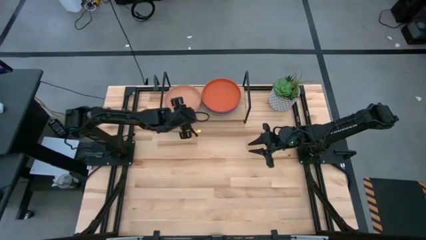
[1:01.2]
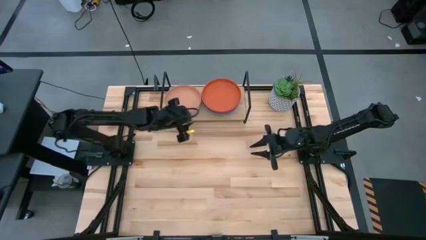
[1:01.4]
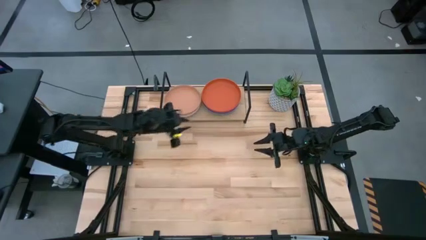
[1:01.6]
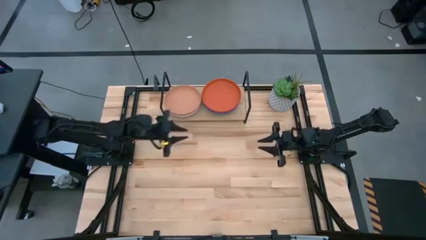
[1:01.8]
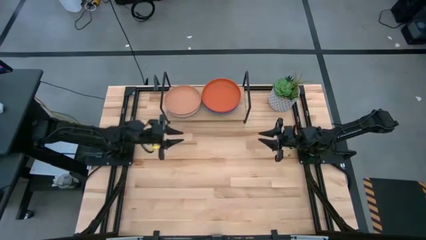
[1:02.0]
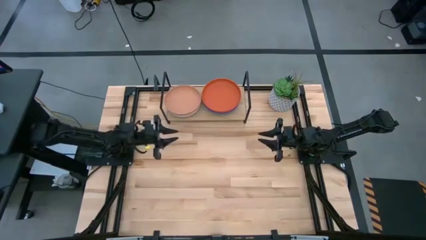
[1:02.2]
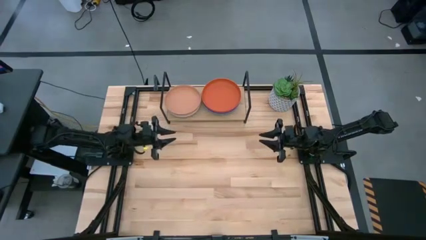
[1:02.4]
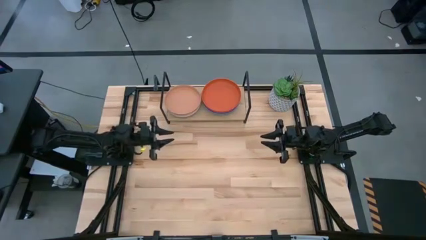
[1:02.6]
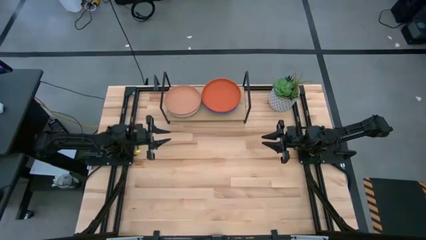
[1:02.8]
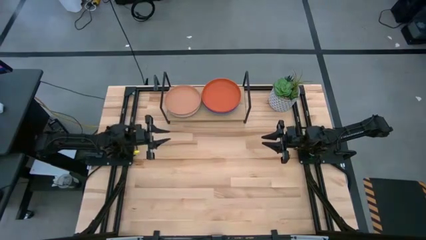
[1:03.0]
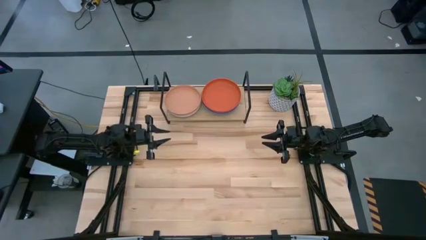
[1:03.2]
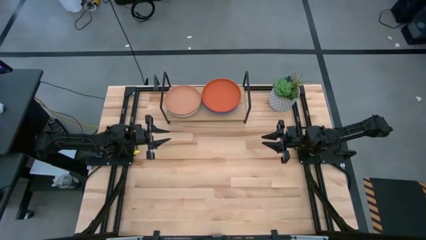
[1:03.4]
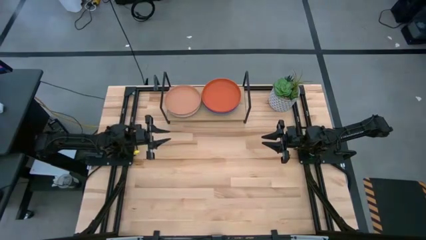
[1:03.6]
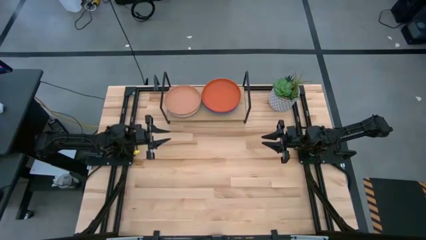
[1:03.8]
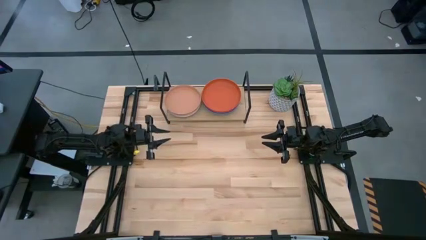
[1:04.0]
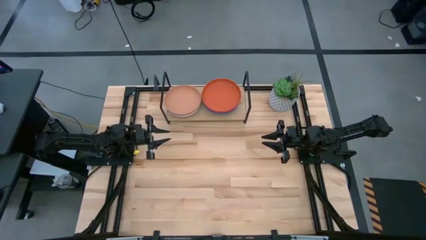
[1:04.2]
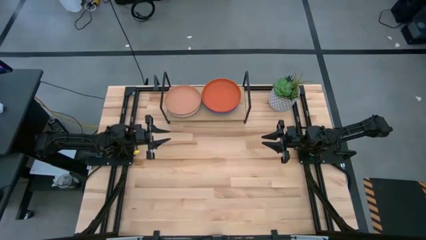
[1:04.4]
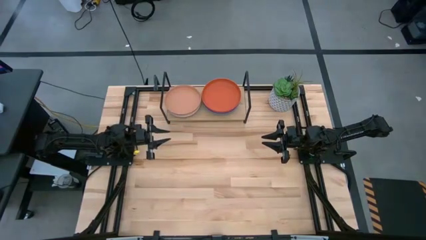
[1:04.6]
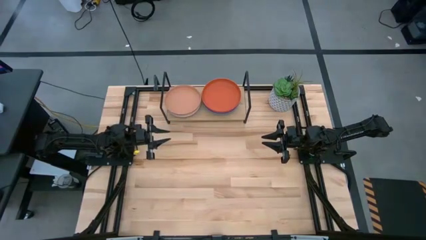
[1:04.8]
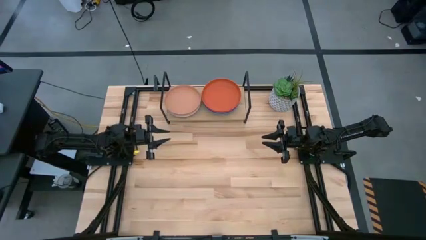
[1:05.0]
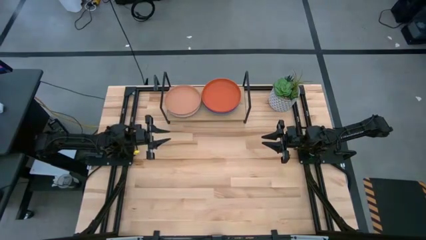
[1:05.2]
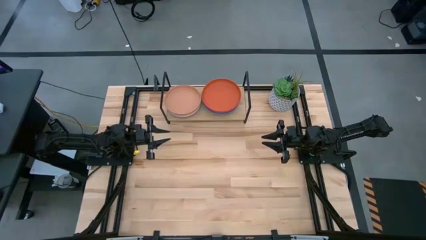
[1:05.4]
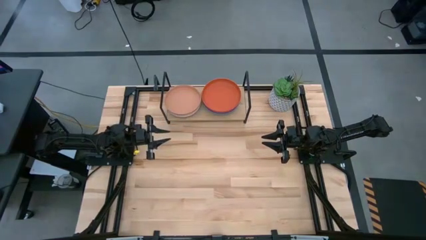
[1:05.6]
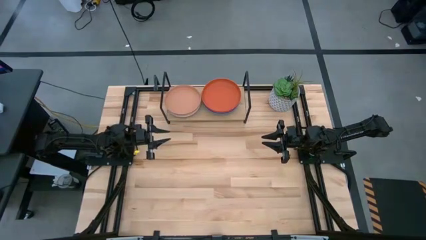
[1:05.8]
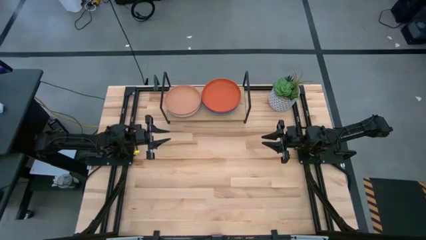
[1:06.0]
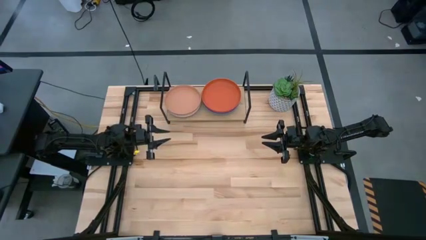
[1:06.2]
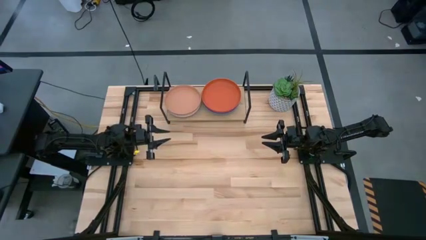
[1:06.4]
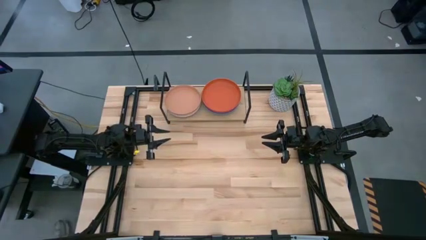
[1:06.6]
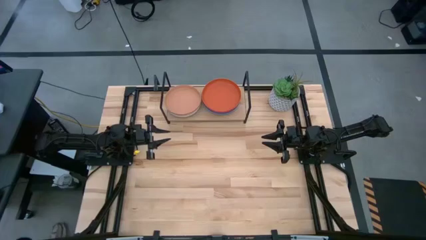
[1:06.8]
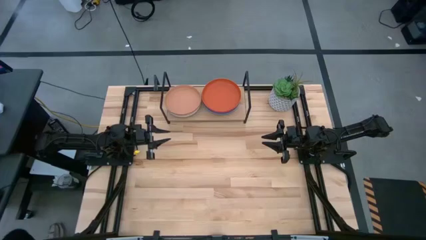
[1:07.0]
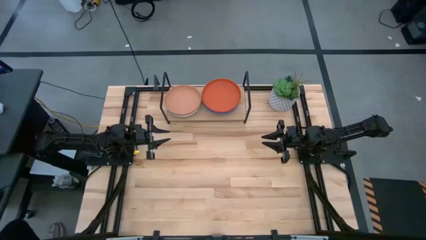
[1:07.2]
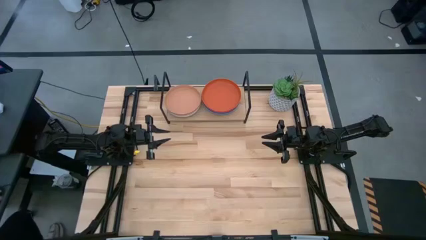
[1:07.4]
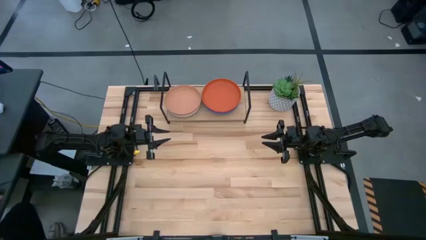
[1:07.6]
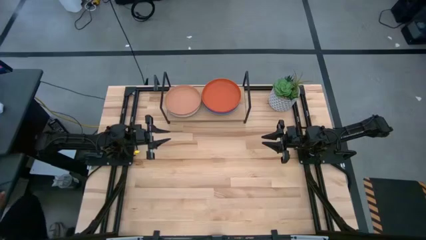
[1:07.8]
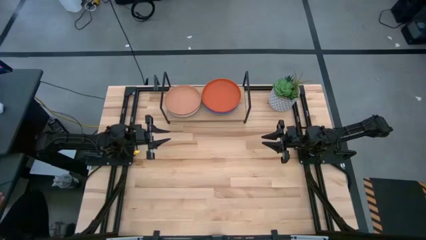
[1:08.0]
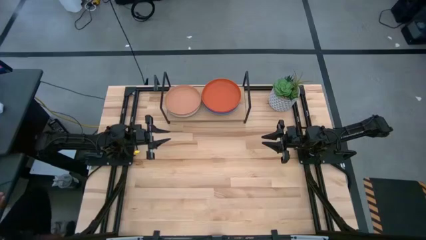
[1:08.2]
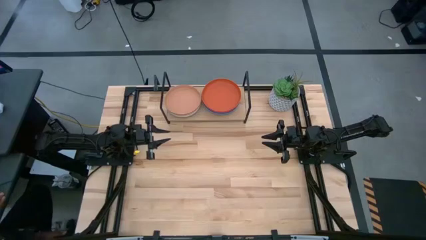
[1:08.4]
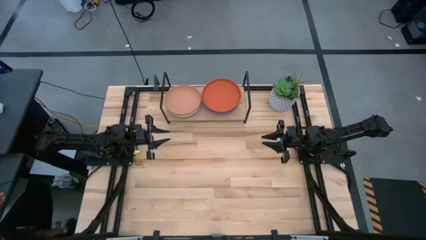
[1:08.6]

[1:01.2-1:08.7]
Task: Place and stack plates onto a shelf
Return to Home Position

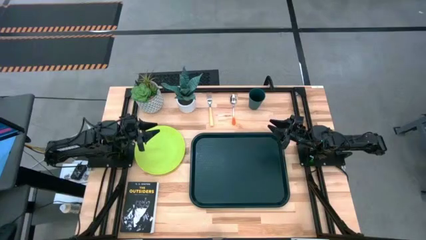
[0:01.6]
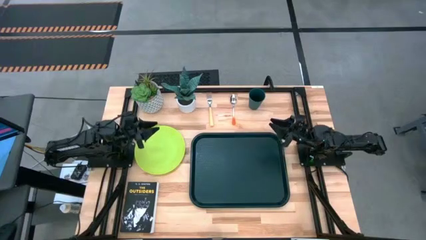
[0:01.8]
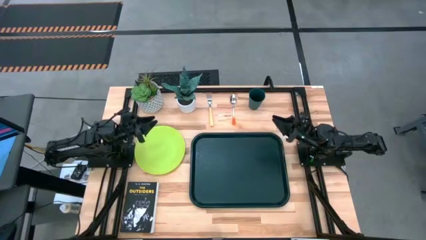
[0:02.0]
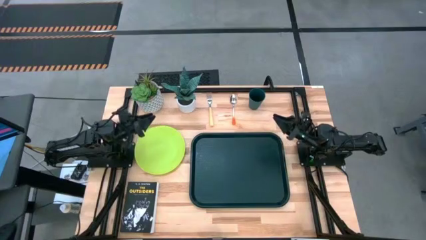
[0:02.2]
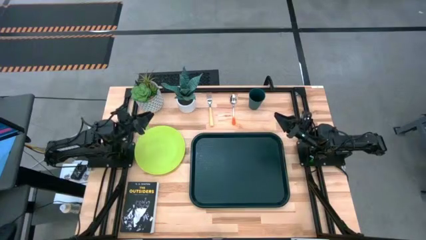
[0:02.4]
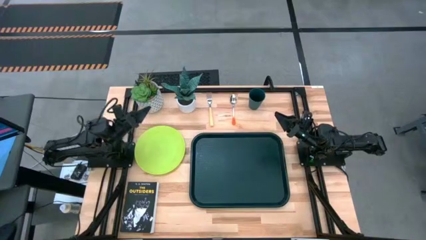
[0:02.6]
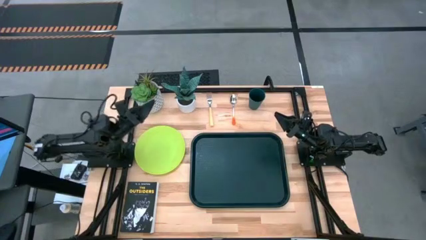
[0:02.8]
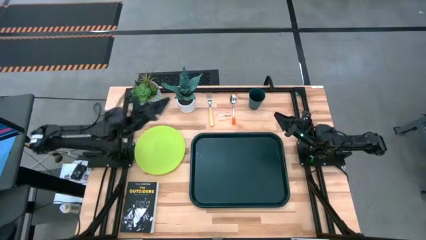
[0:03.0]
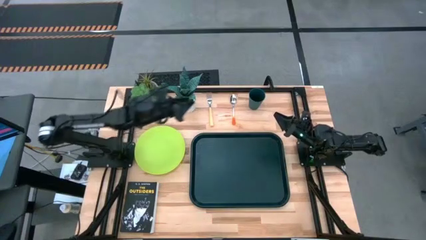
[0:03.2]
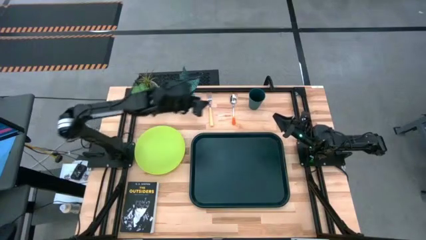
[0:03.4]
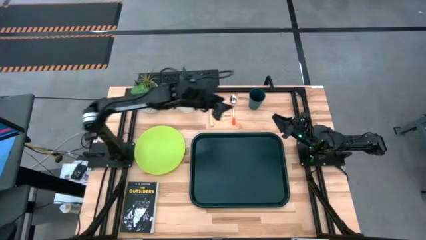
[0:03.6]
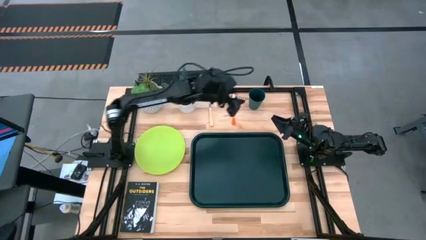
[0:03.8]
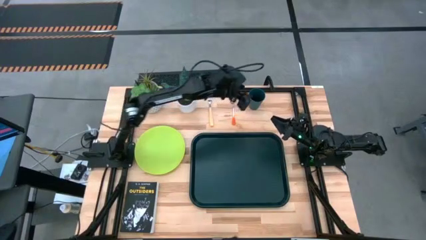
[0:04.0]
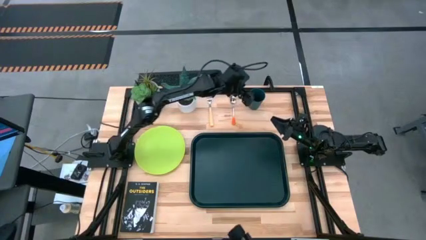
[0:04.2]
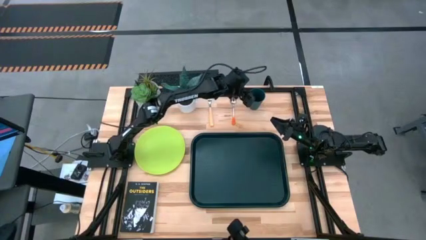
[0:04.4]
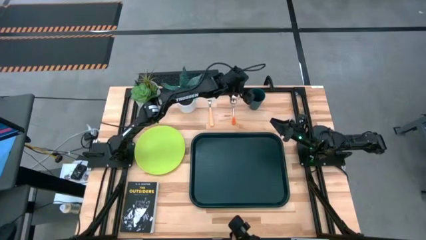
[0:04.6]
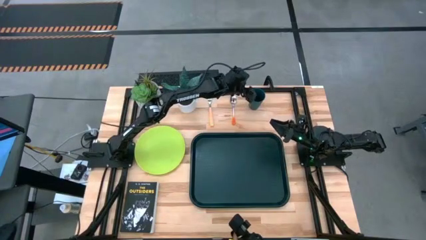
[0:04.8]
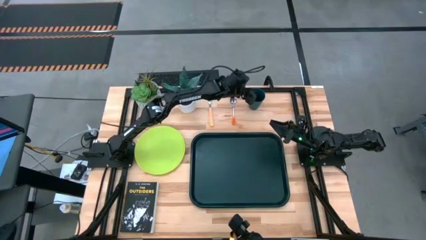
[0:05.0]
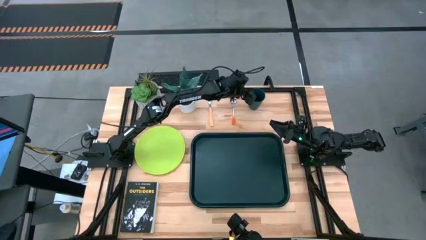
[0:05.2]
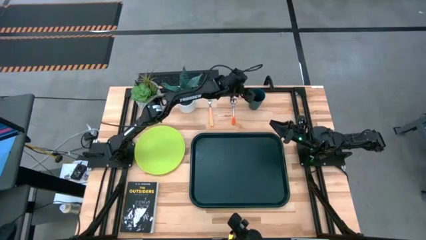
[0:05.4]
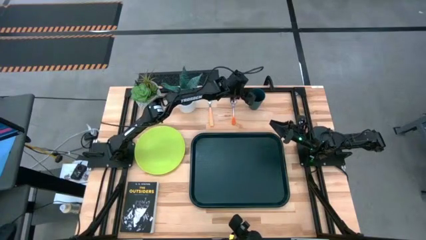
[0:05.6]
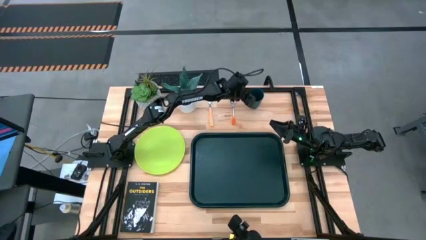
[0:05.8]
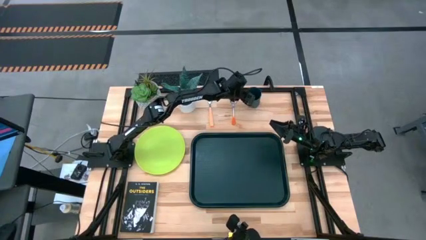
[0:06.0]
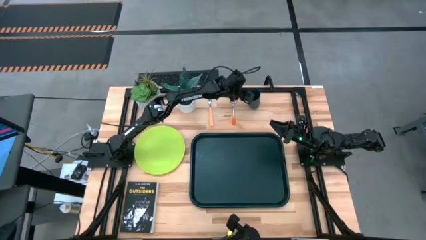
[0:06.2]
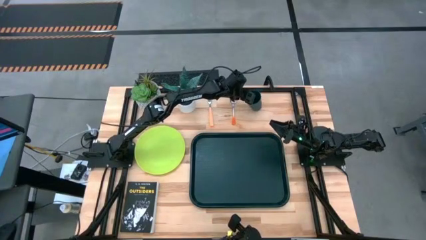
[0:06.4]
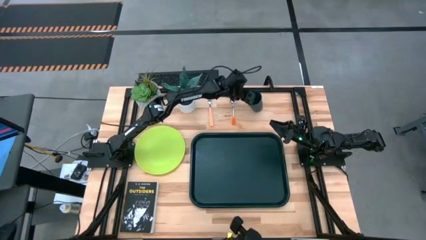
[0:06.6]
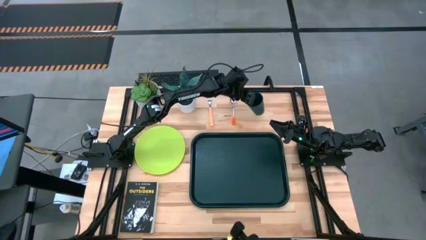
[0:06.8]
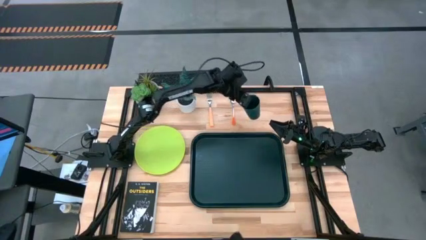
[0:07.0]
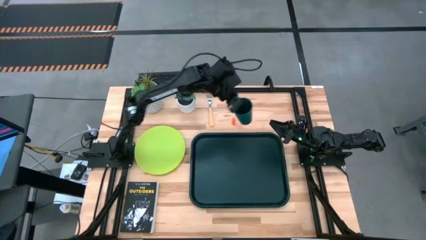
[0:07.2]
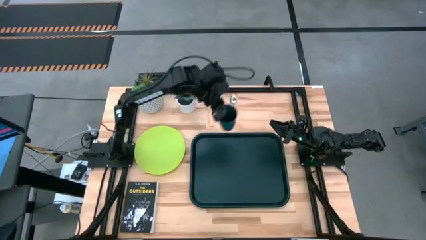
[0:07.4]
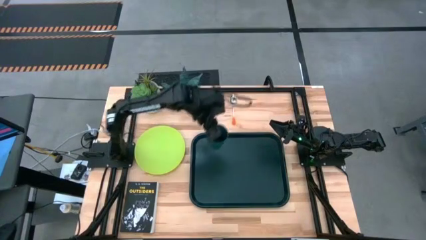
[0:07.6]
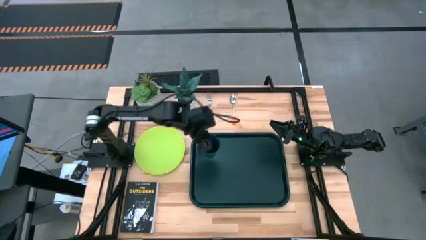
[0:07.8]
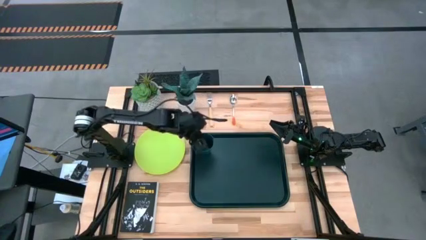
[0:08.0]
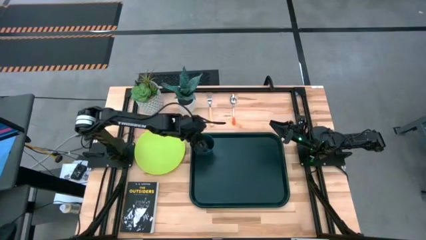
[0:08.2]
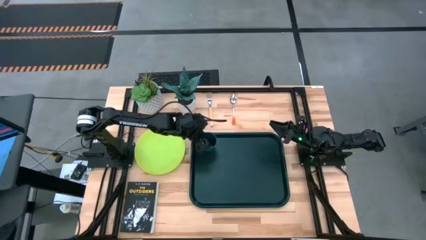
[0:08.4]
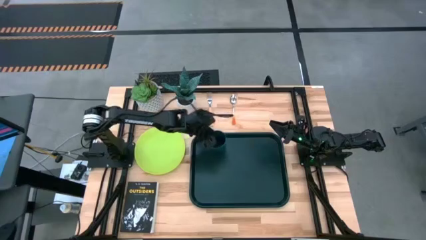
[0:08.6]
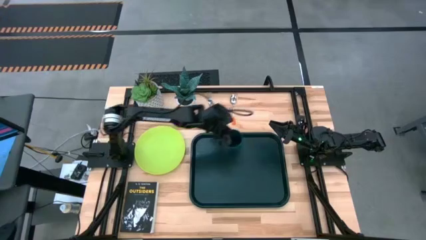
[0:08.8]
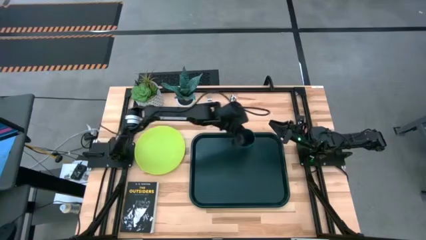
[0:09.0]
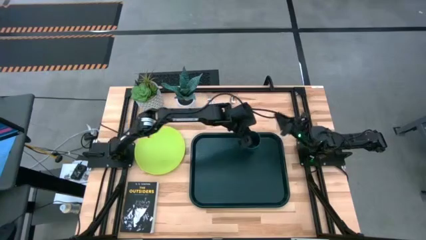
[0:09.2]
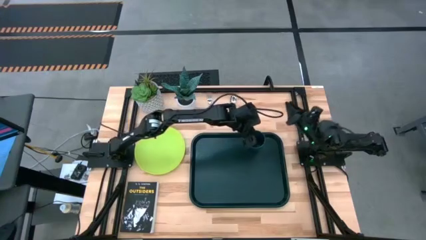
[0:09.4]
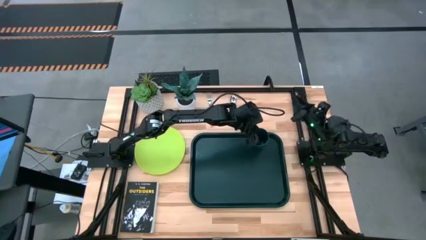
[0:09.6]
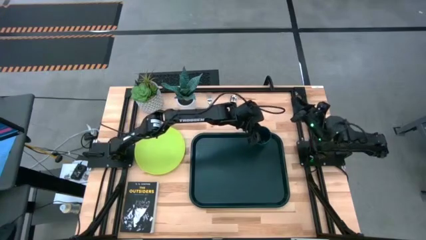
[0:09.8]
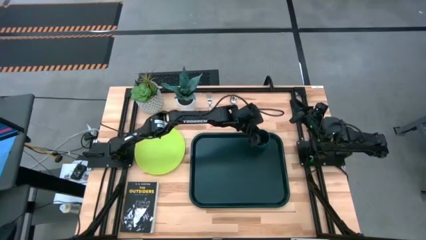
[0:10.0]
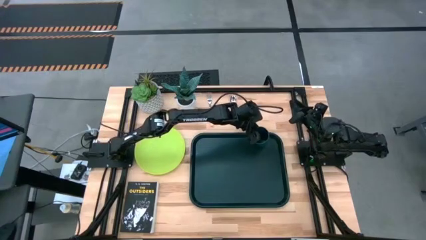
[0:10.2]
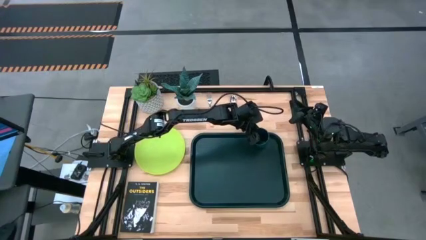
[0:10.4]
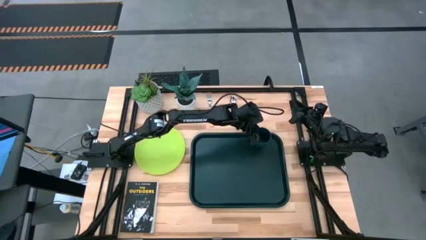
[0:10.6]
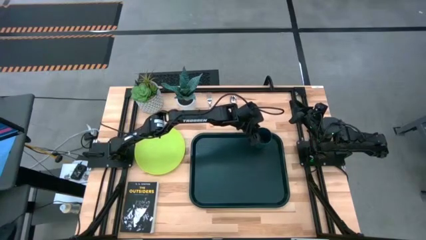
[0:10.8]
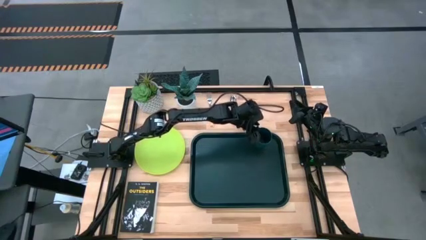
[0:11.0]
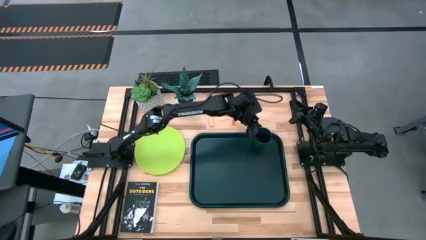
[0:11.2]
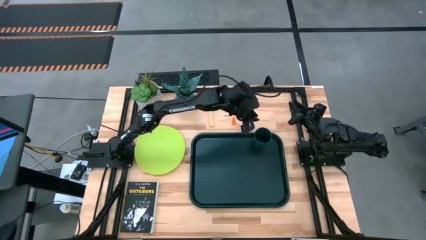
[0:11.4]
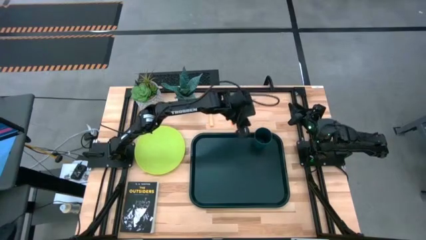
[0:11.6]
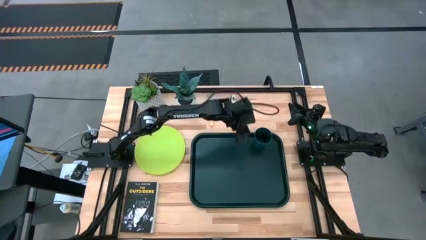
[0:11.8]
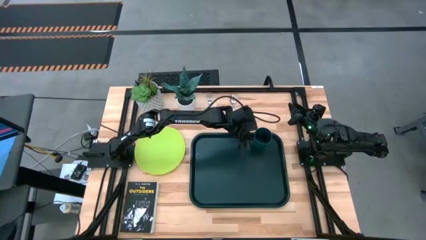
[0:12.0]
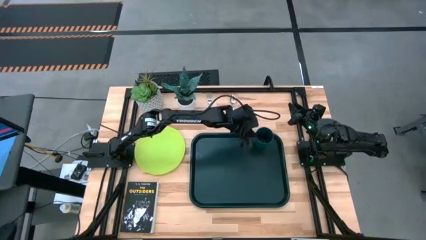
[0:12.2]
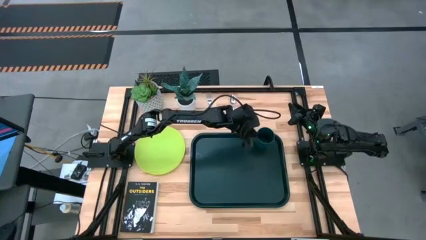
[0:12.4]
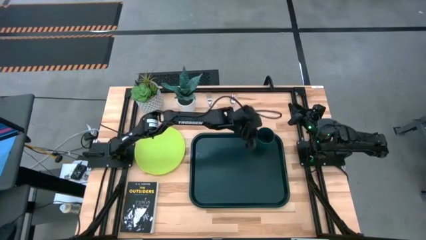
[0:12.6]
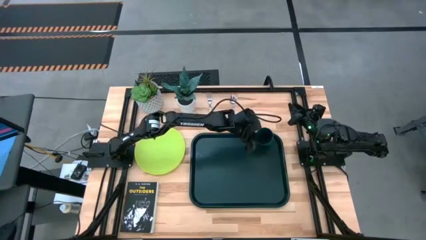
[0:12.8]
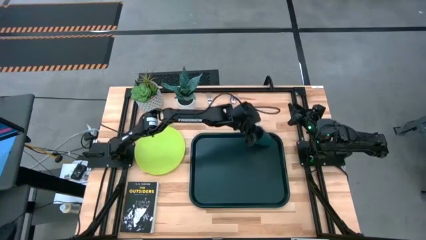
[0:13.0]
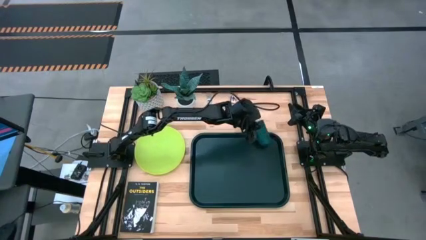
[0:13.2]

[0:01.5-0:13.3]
Task: Pick and place plate/cup/fork/spoon on tray
Put the green cup on the black tray
